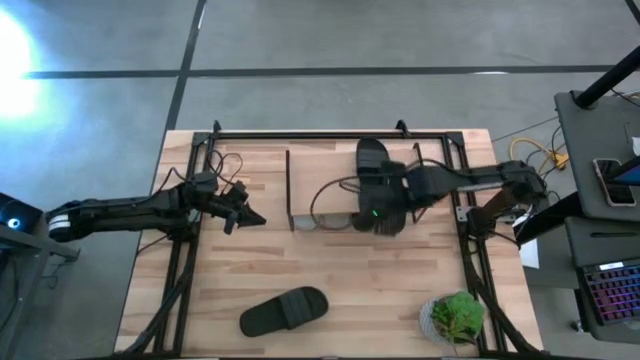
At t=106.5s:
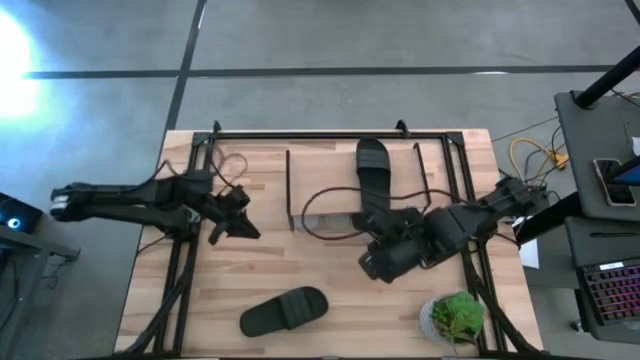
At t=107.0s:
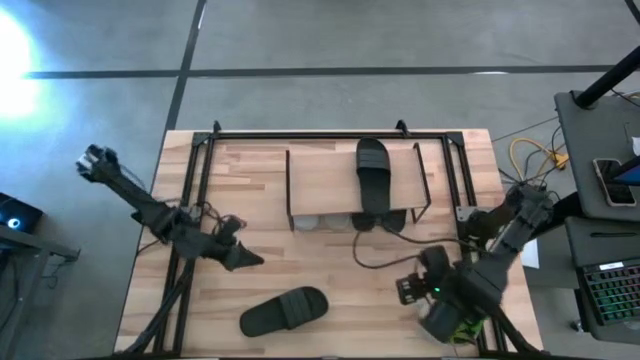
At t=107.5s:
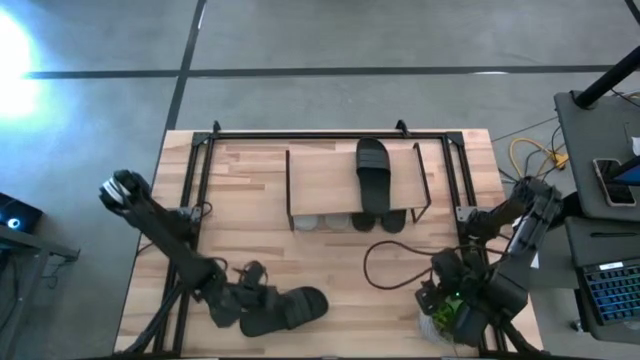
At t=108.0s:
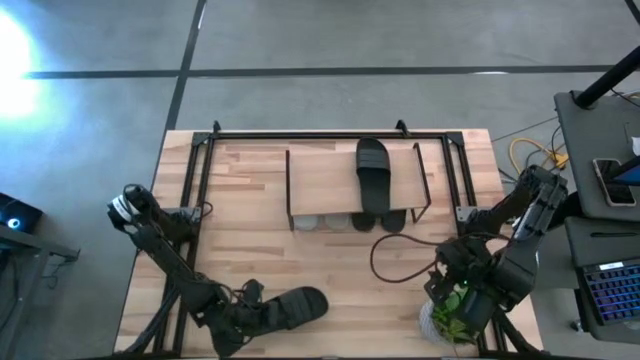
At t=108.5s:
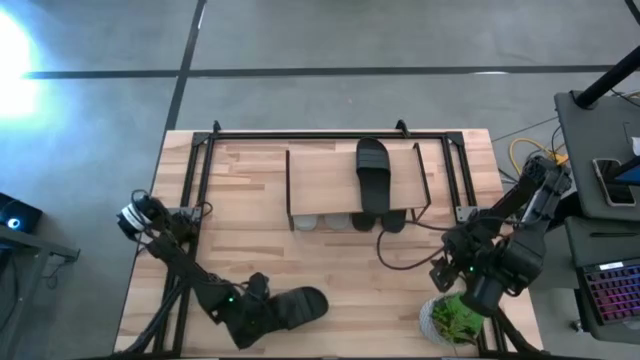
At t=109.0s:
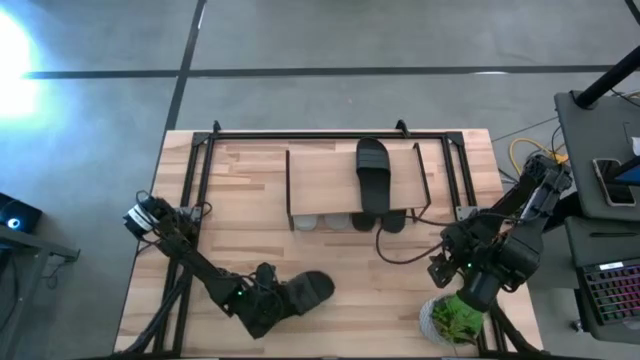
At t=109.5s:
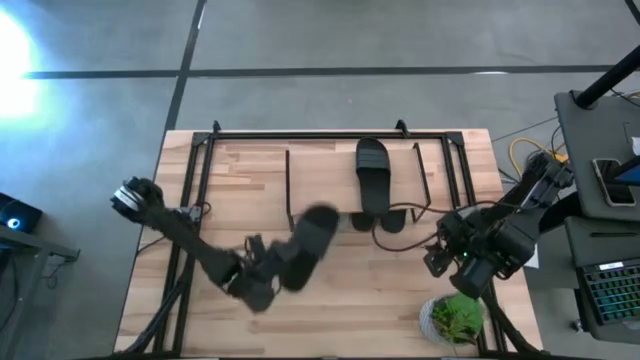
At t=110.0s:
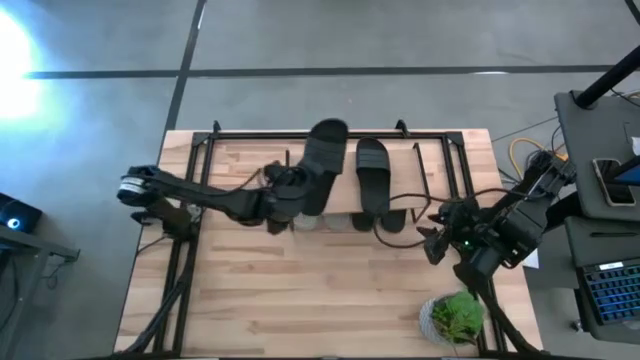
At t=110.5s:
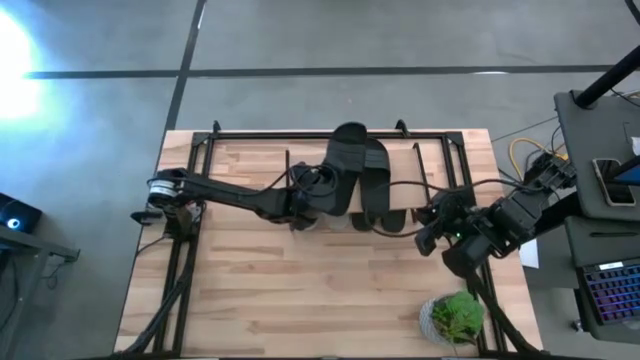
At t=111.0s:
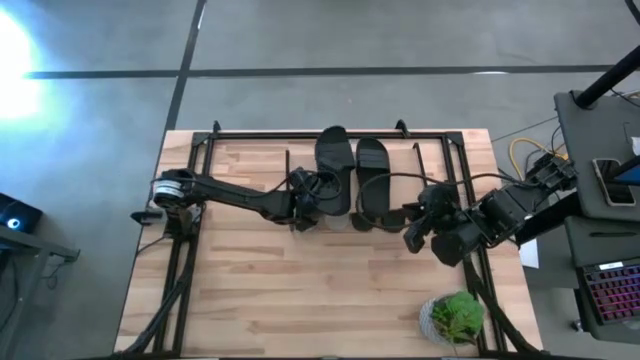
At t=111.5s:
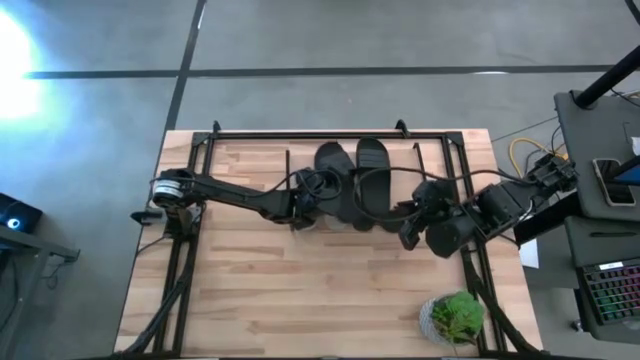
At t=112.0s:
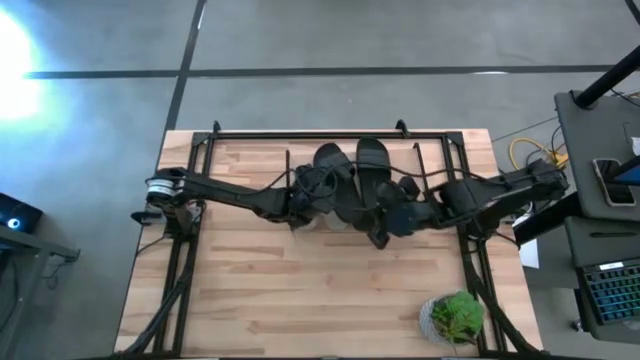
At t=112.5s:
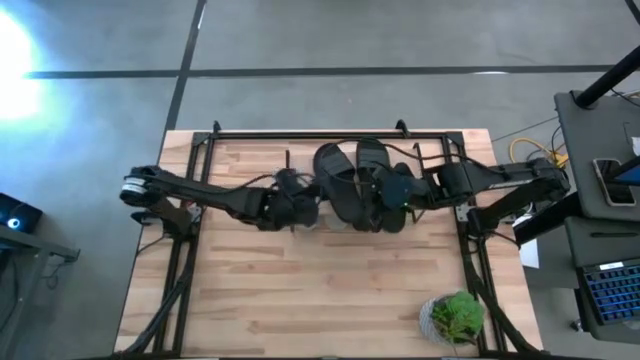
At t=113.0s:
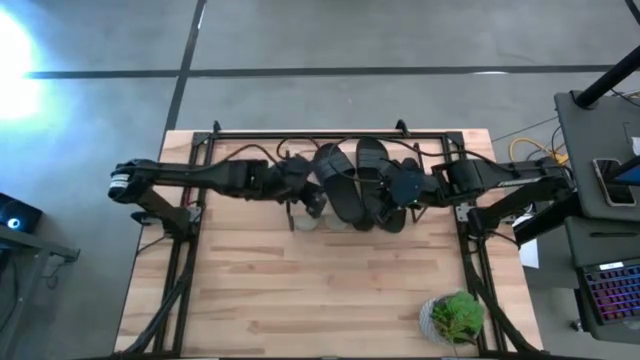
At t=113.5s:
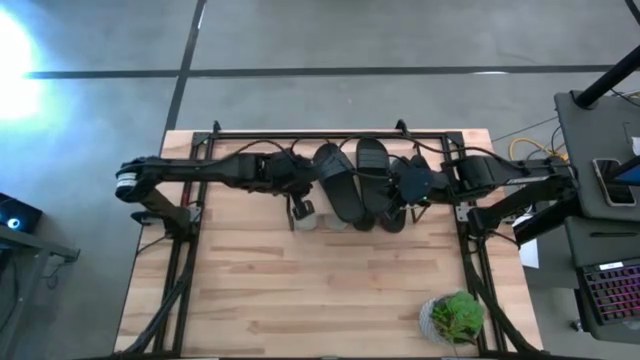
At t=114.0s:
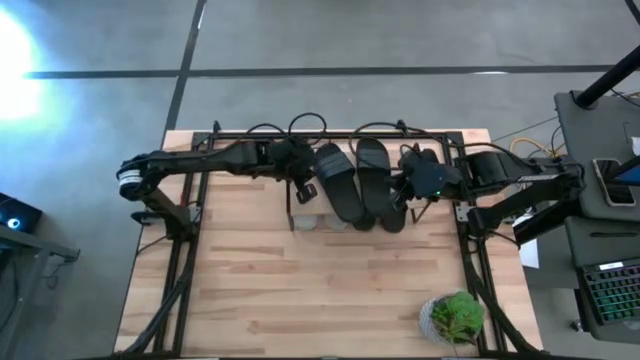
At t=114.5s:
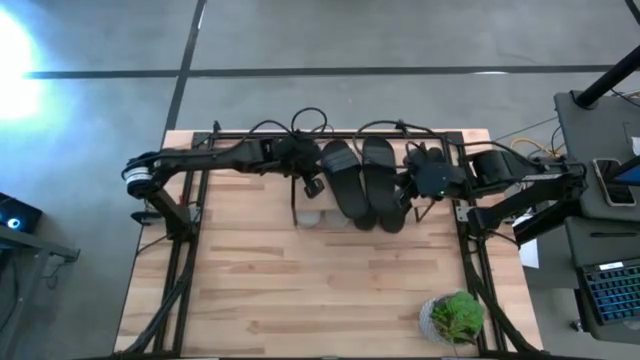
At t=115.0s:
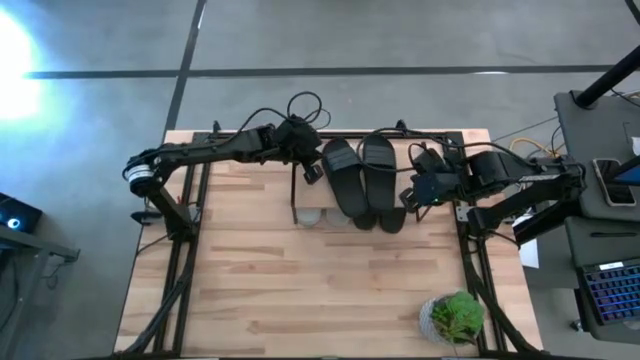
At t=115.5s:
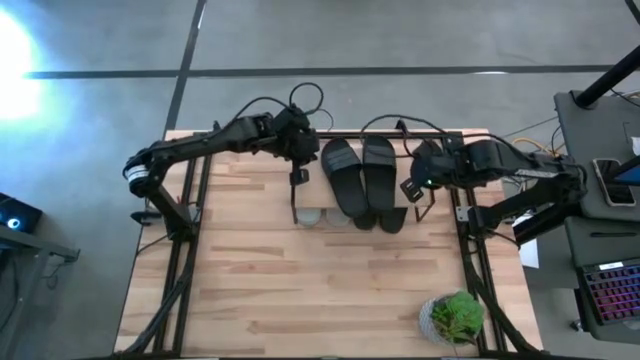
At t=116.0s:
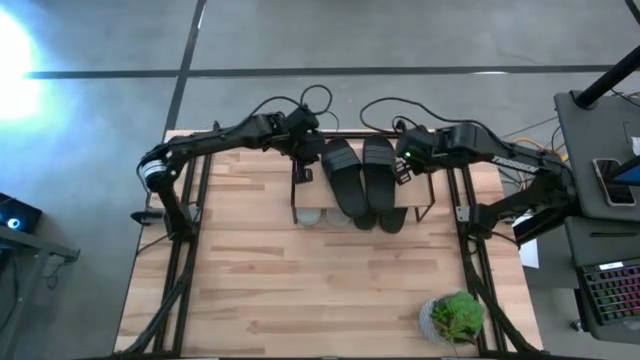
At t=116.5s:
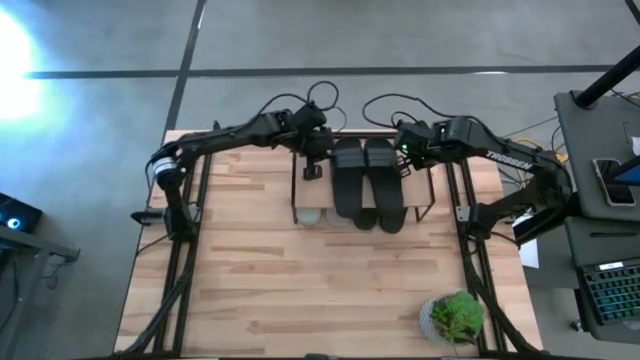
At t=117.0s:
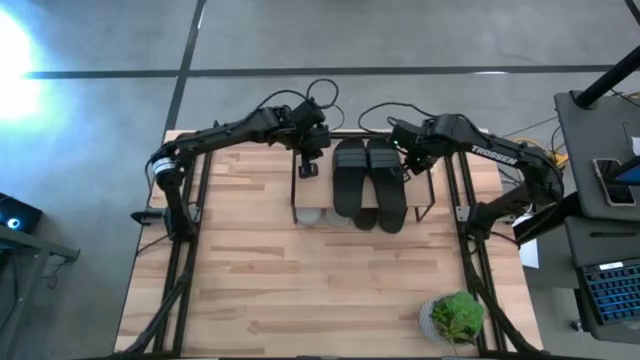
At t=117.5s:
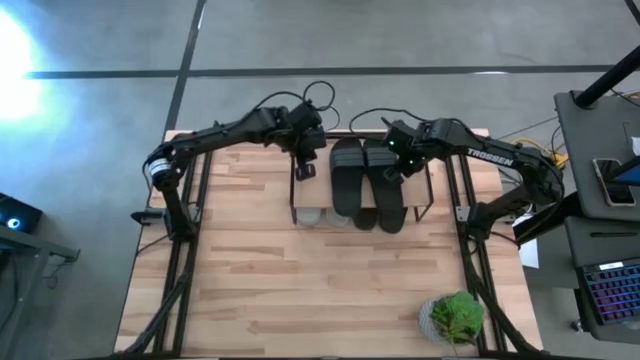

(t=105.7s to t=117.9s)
Task: Pick and place slides into the shelf
Put the black slipper on the shelf

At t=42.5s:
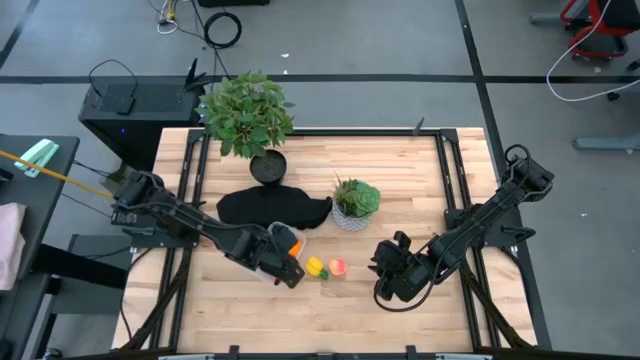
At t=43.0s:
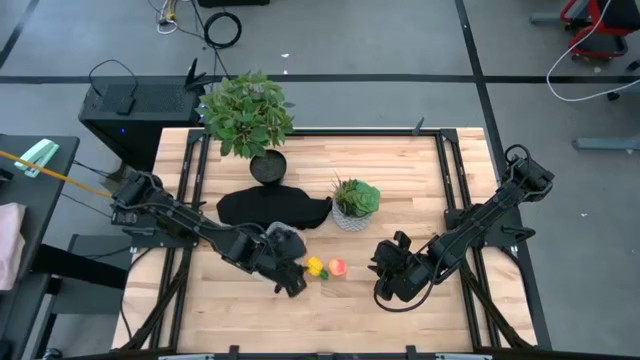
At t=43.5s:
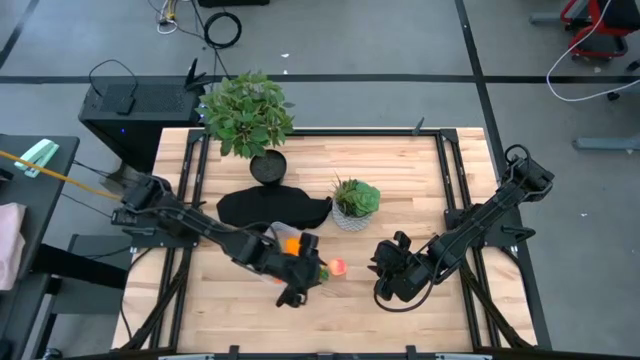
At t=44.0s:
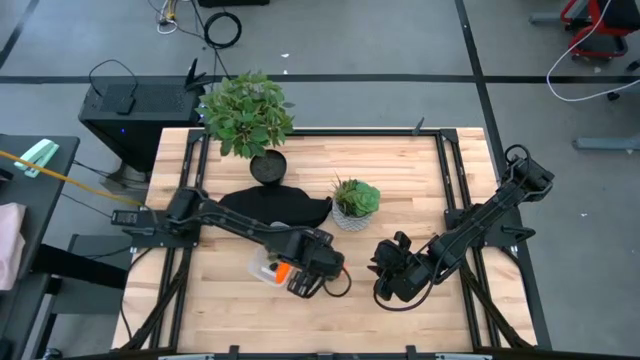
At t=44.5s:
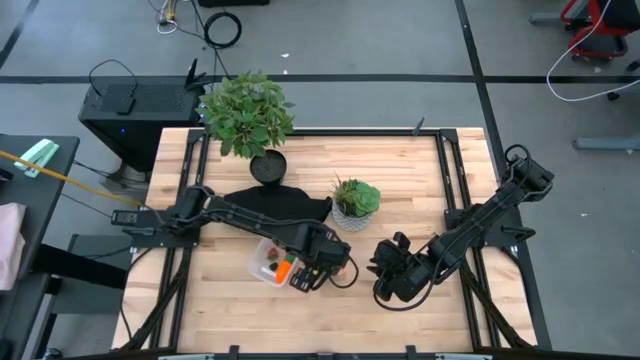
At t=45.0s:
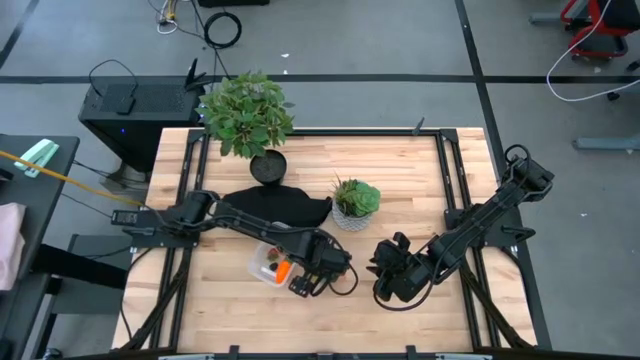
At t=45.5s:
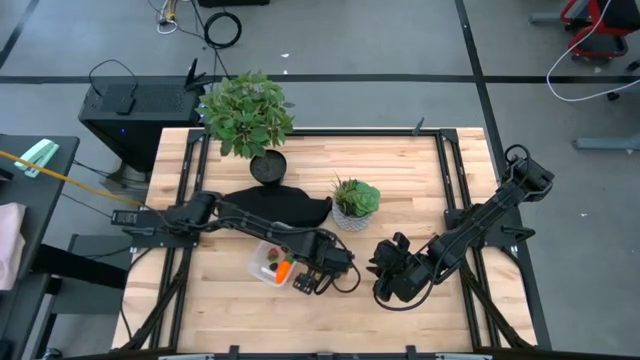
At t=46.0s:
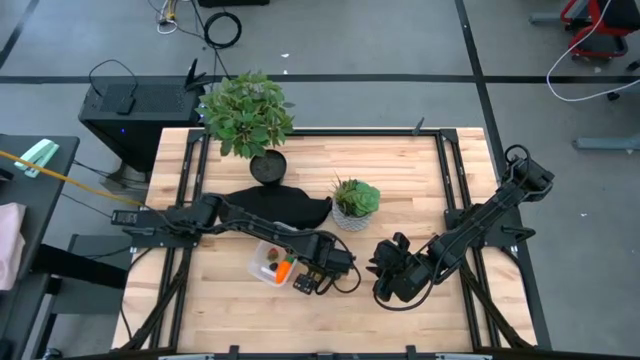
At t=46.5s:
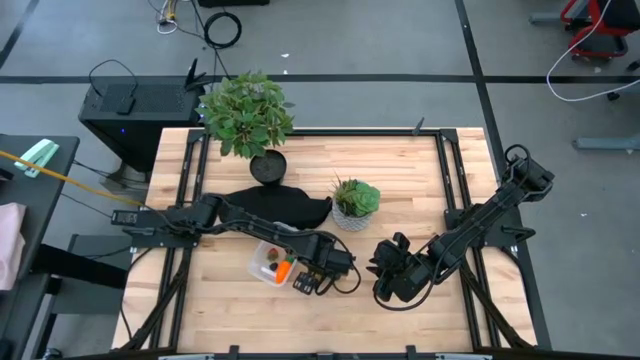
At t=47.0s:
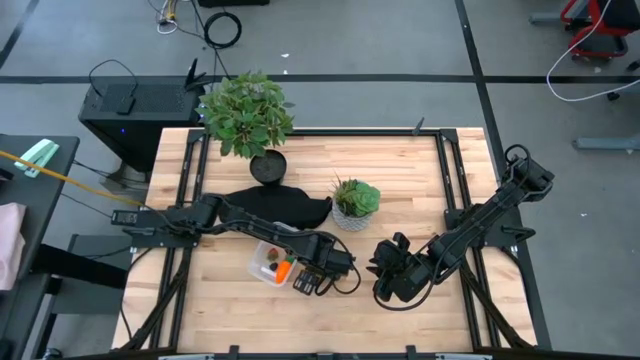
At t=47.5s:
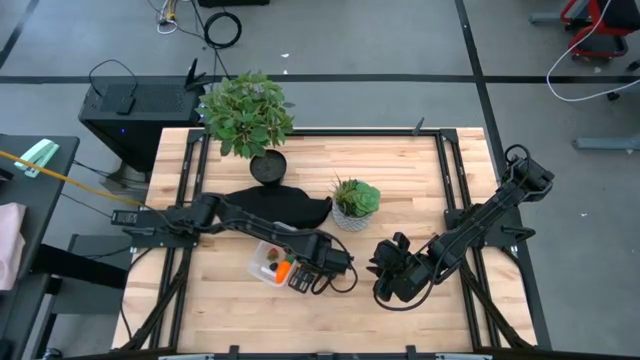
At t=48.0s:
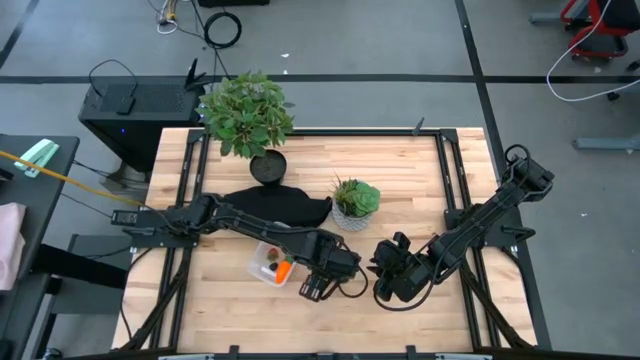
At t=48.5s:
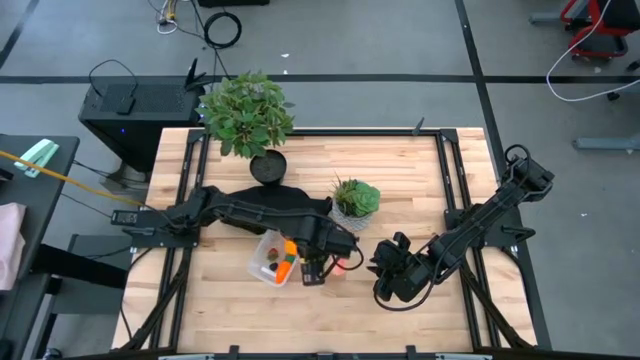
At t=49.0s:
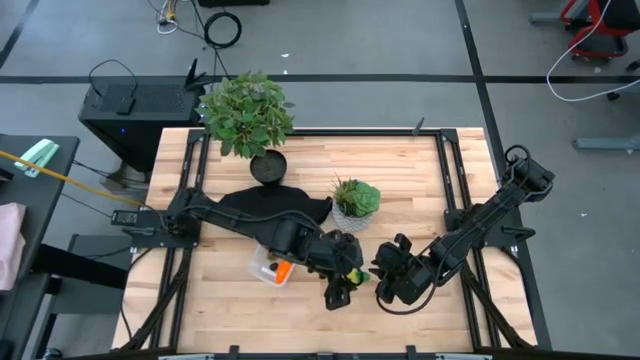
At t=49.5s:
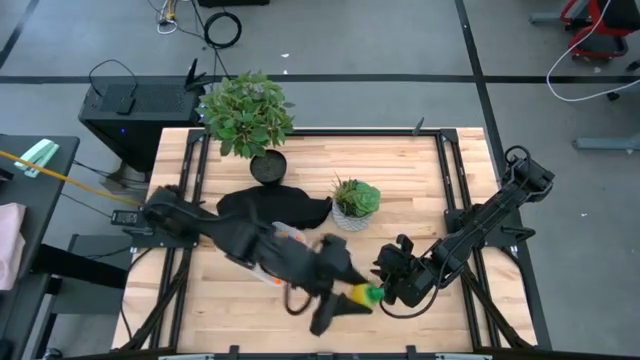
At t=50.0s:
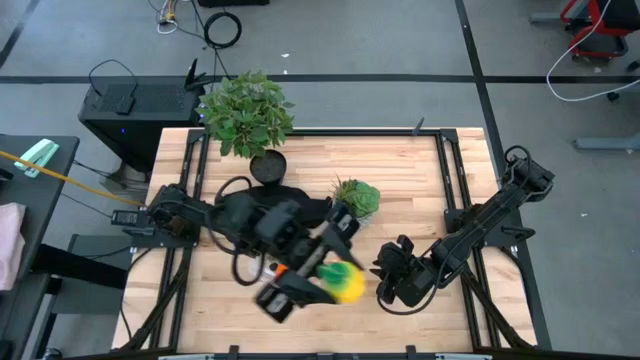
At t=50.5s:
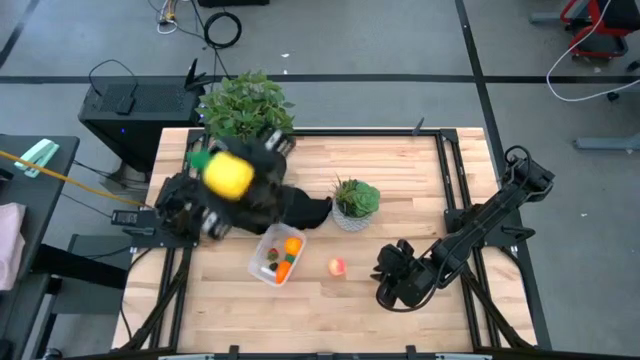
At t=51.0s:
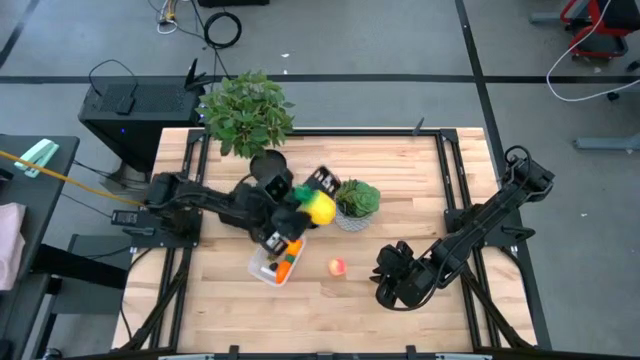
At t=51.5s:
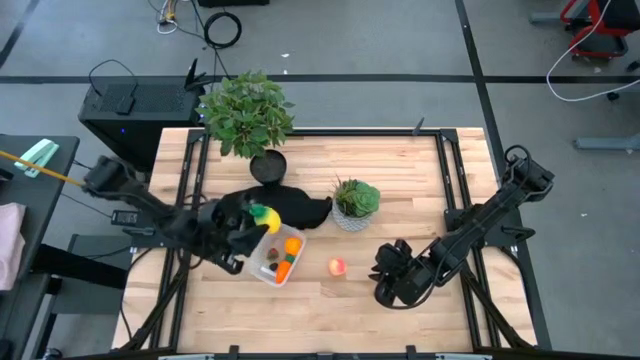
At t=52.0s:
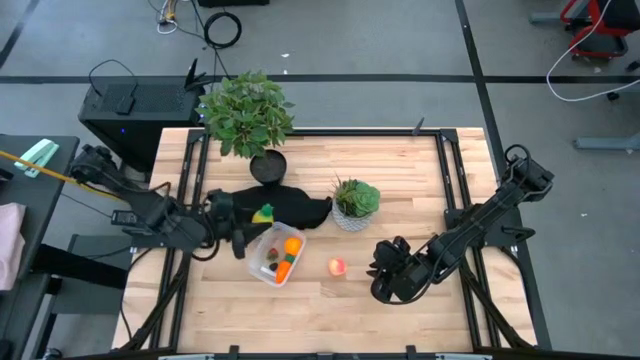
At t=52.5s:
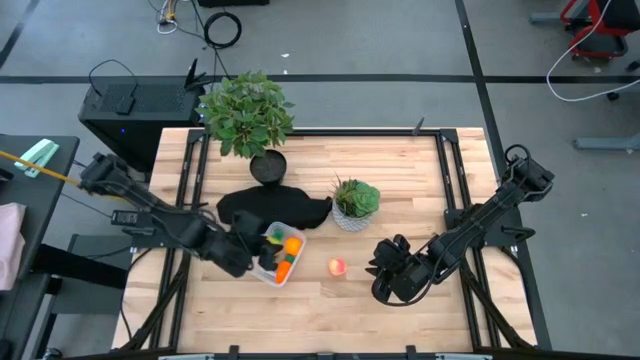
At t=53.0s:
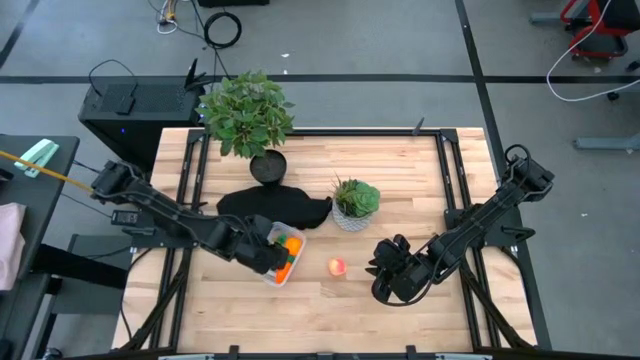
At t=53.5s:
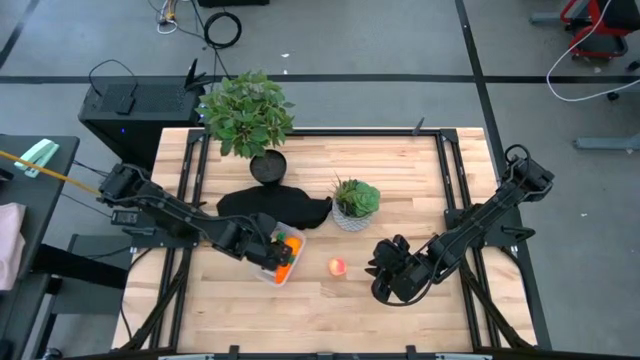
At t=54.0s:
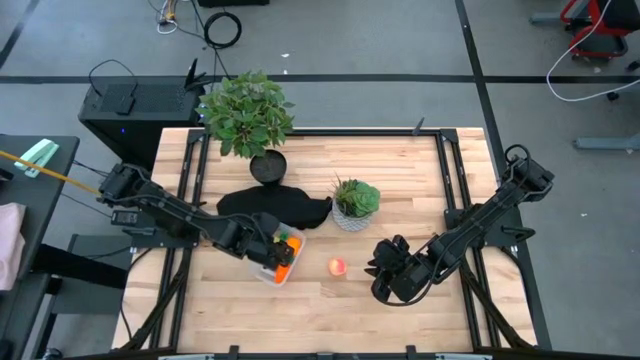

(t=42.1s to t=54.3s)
Task: Pick and placing Produce into tupperware
Put the pineapple into the transparent bin
